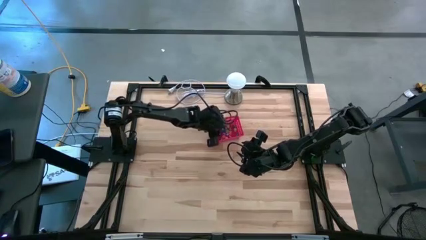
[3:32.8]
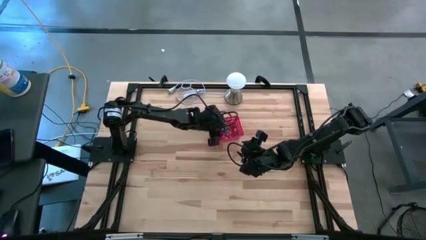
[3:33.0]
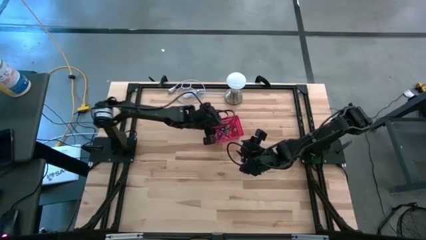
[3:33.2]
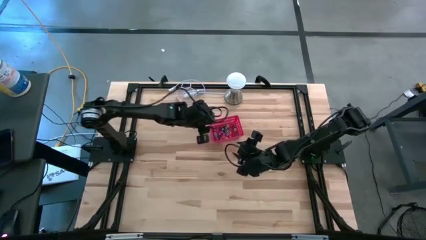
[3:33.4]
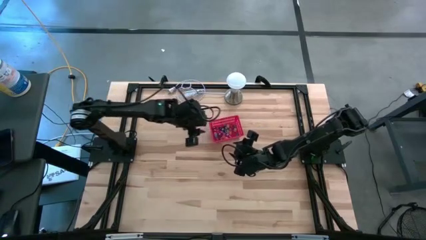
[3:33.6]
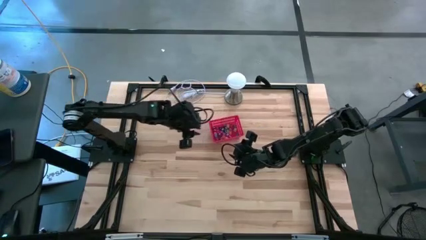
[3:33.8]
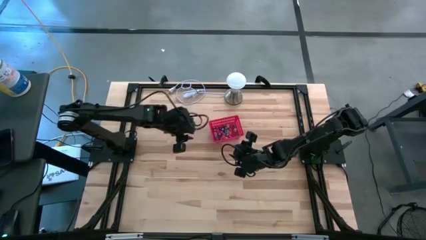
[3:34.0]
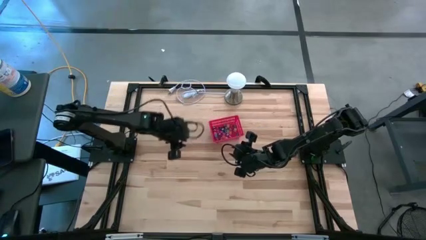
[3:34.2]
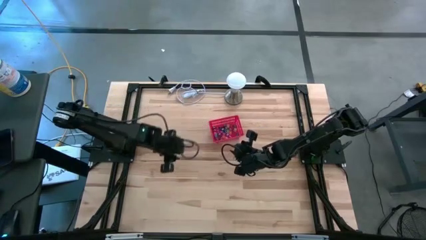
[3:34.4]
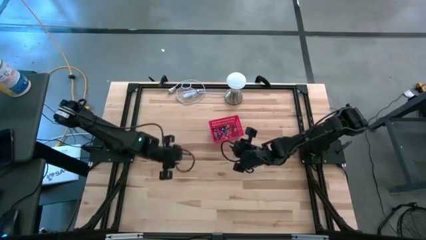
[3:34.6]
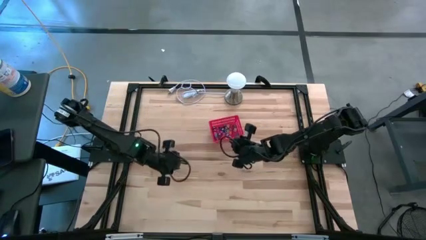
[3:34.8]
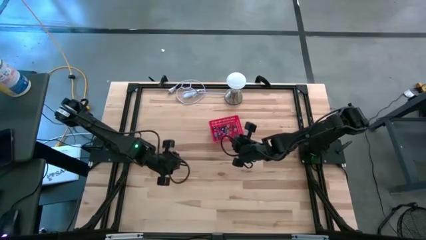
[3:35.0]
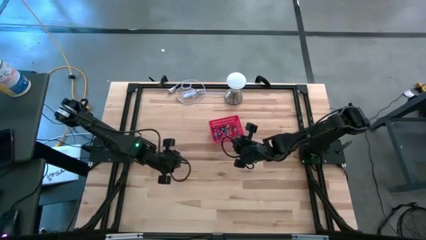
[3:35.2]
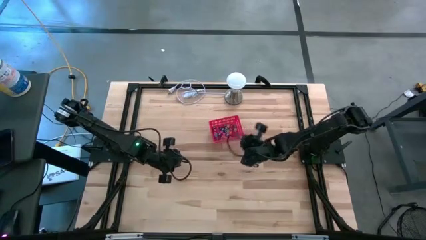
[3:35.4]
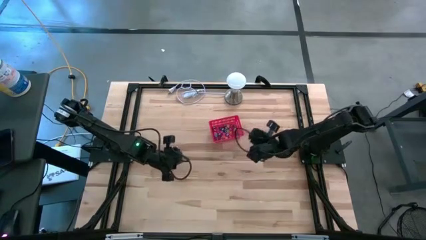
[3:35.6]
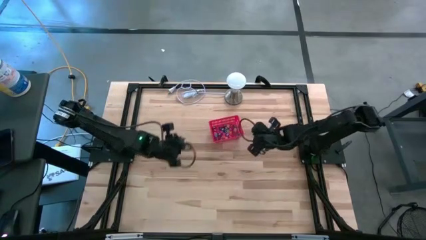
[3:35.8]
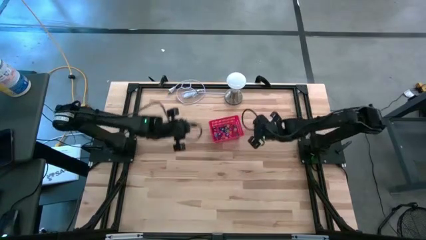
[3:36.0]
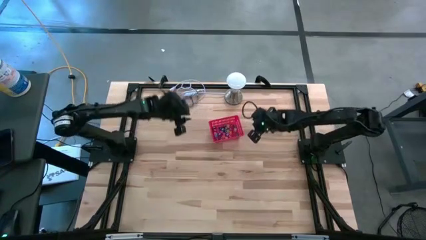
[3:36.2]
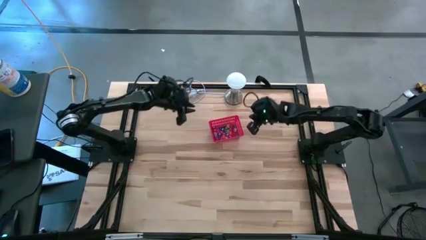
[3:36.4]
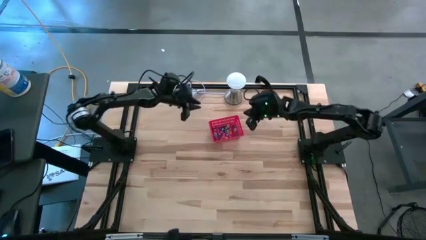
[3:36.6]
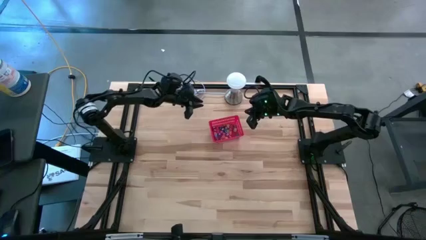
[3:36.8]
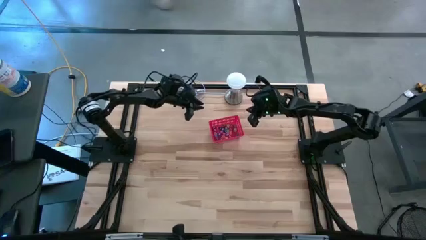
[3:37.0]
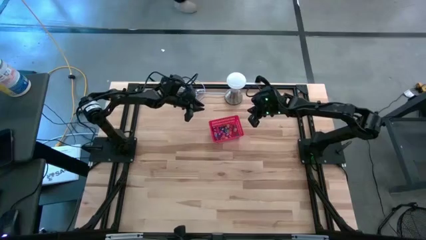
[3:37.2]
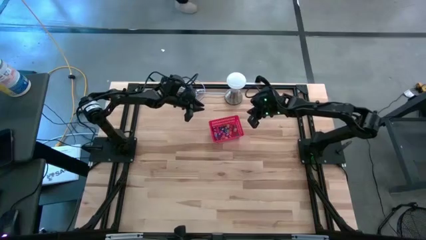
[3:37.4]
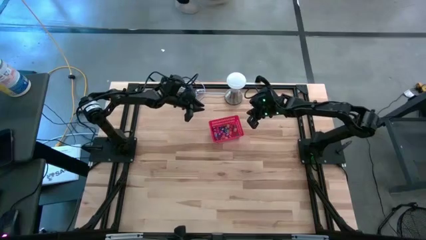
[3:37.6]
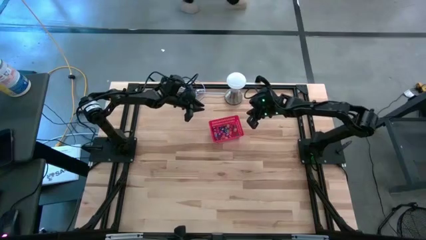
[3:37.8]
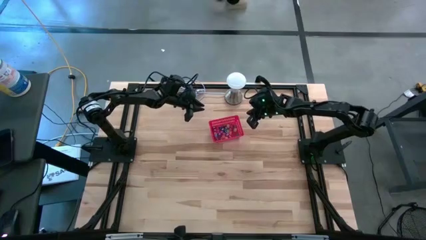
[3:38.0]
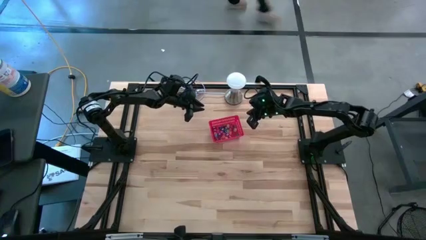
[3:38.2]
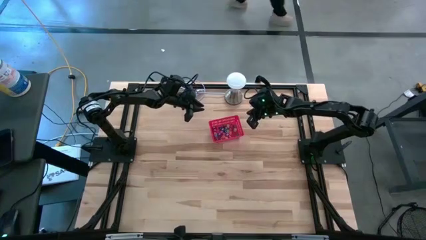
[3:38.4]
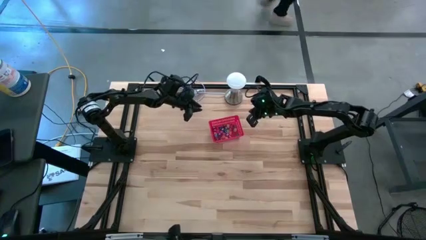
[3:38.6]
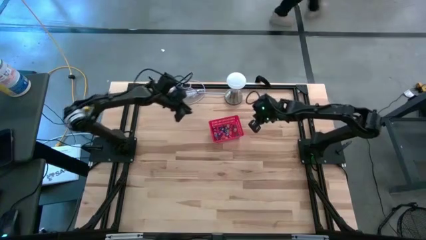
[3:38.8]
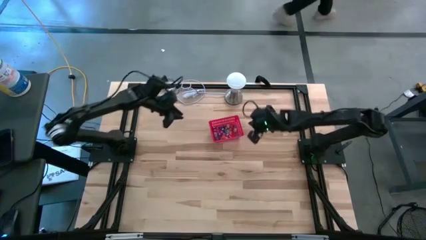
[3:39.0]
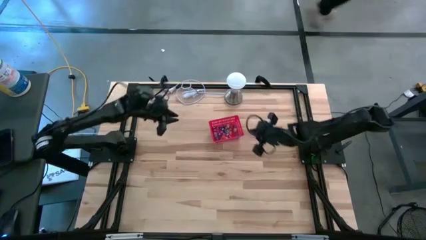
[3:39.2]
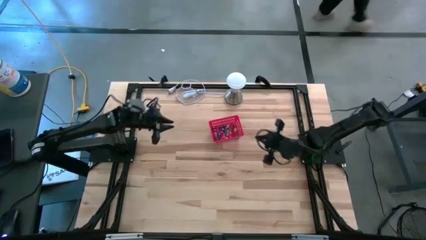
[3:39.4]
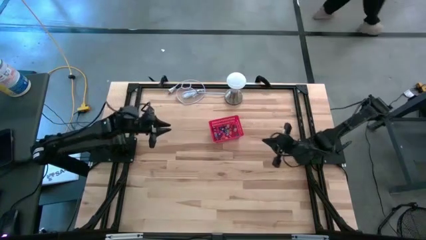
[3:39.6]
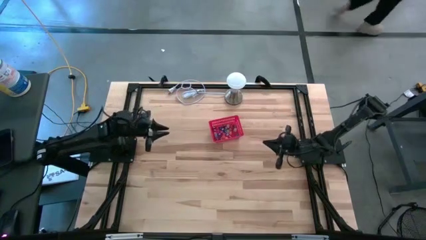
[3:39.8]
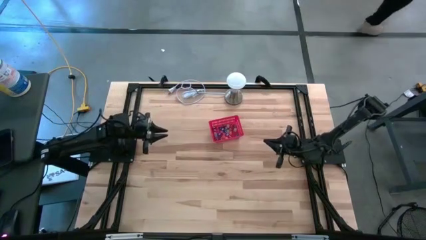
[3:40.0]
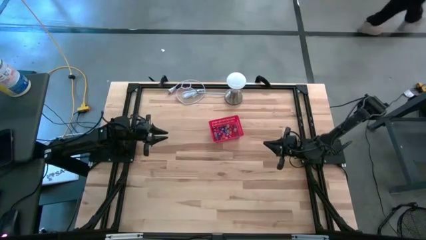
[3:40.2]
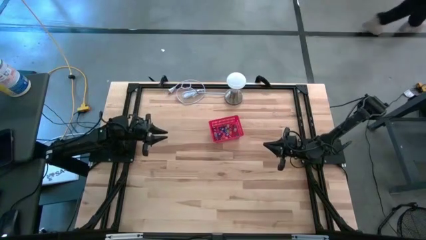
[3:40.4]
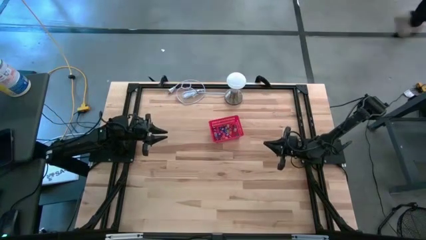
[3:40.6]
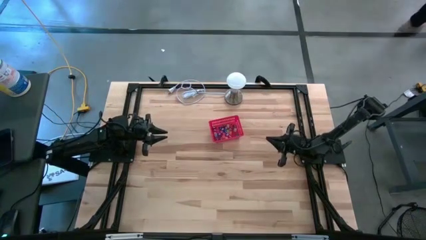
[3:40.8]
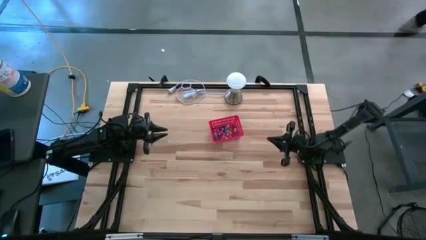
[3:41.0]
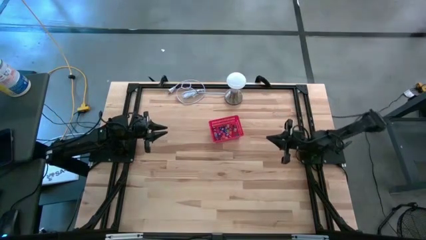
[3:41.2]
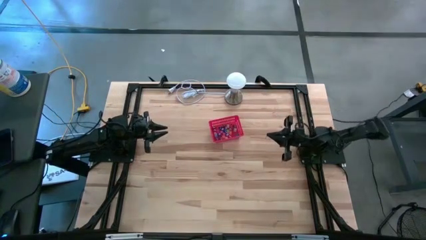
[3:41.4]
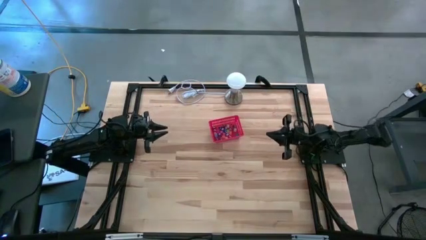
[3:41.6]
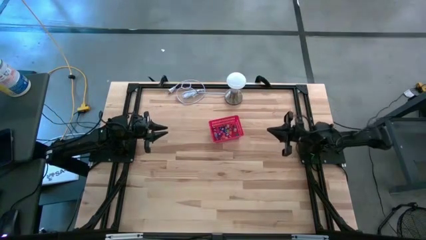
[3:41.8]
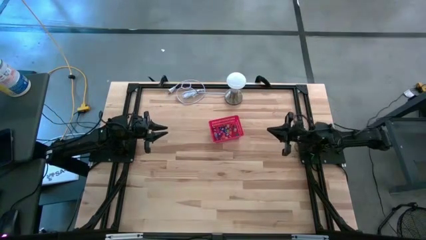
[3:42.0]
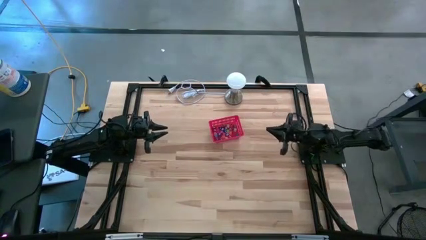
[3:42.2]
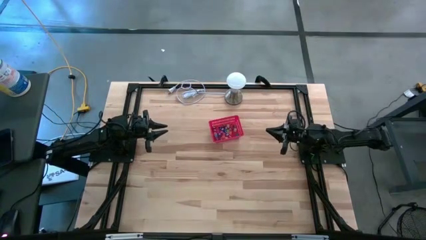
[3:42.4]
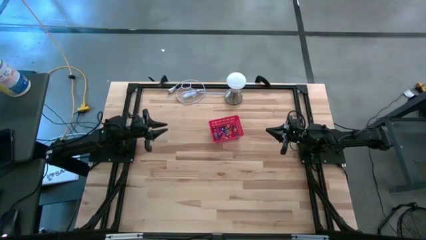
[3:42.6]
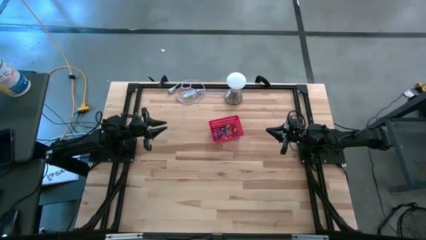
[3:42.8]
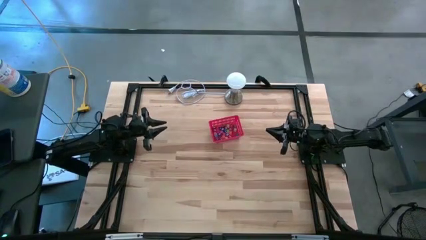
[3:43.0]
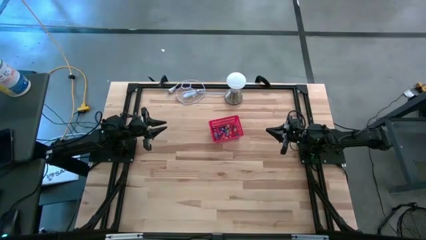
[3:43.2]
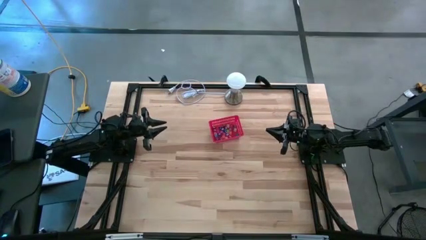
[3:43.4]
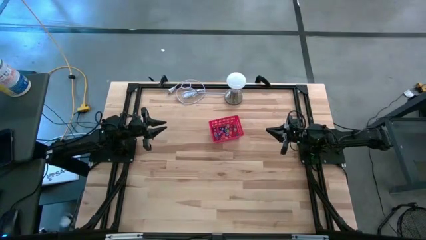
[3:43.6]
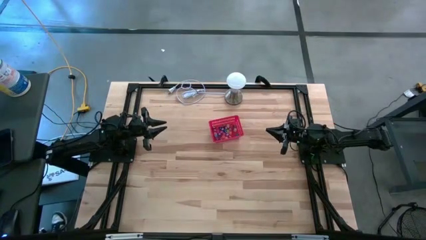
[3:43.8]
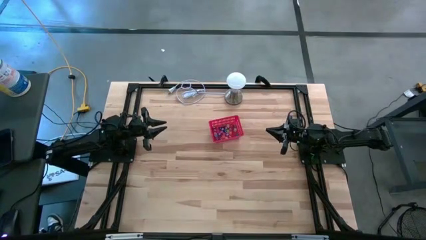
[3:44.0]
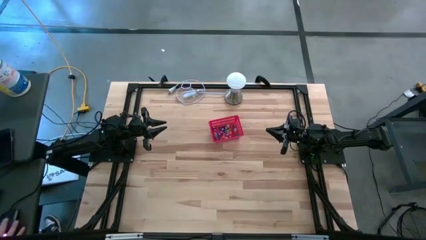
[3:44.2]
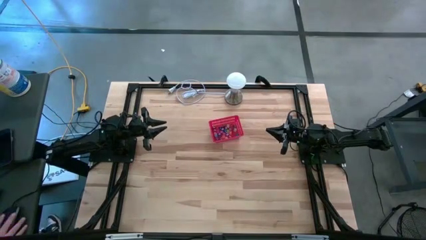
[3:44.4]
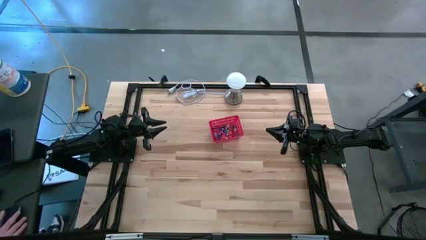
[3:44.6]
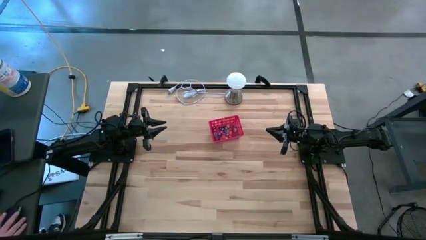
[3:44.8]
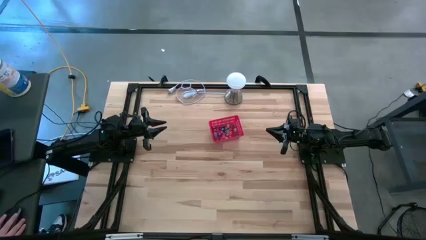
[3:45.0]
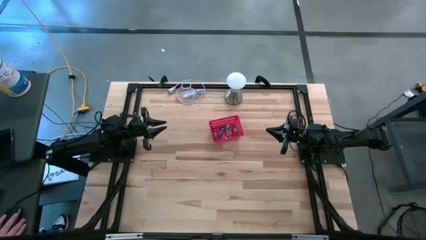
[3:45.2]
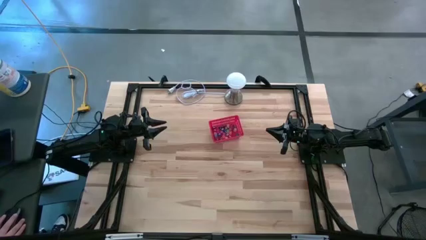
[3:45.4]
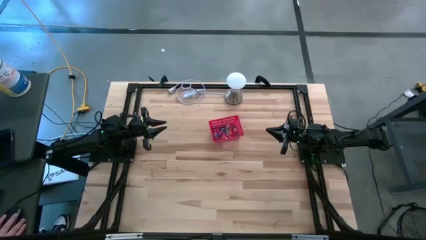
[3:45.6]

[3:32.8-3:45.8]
Task: Pick & Place Dice
Return to Home Position

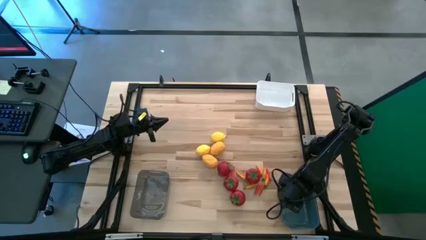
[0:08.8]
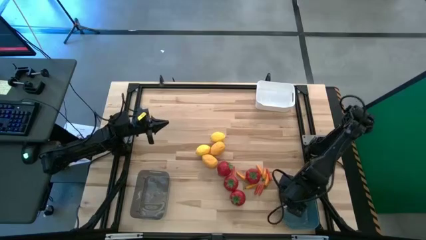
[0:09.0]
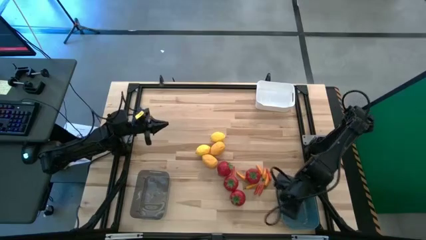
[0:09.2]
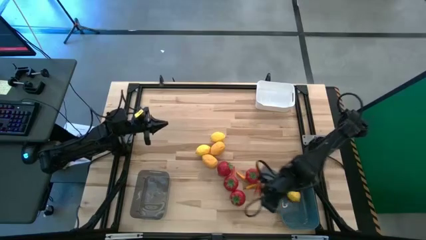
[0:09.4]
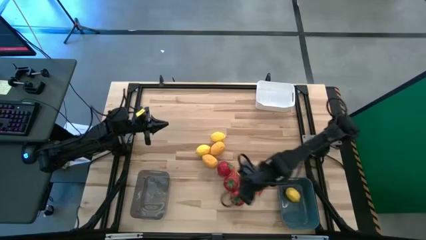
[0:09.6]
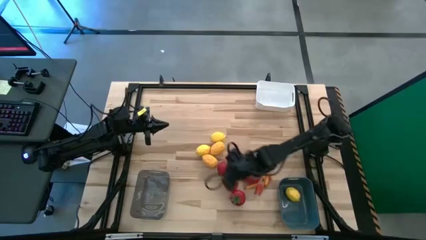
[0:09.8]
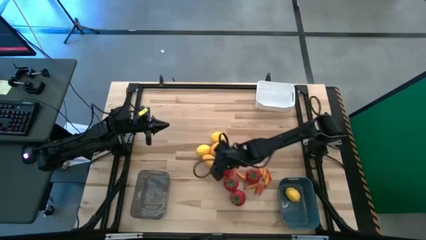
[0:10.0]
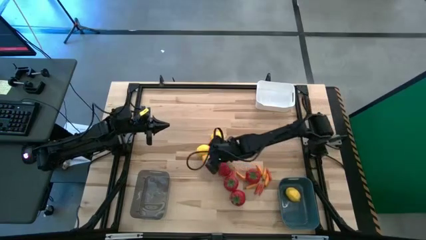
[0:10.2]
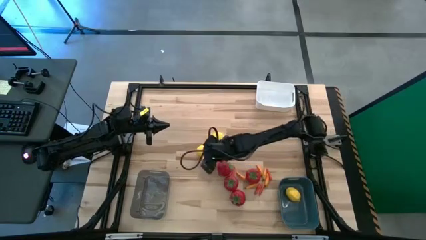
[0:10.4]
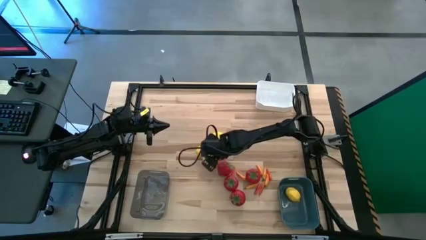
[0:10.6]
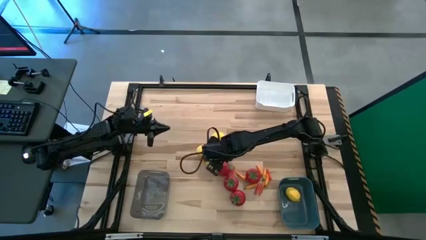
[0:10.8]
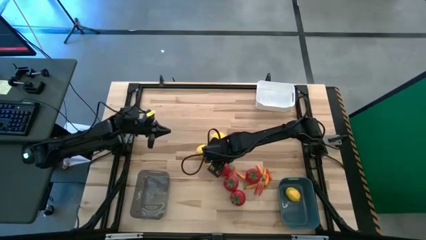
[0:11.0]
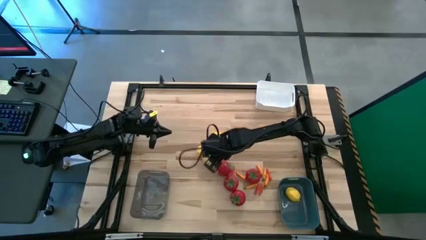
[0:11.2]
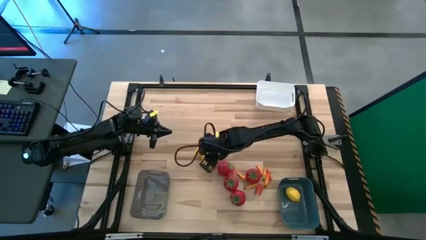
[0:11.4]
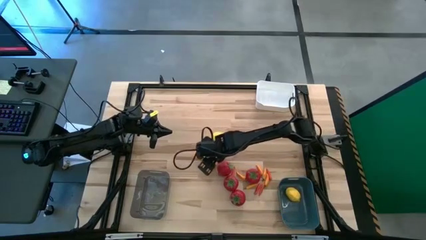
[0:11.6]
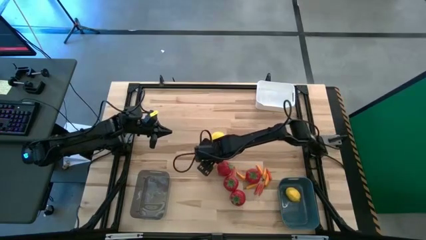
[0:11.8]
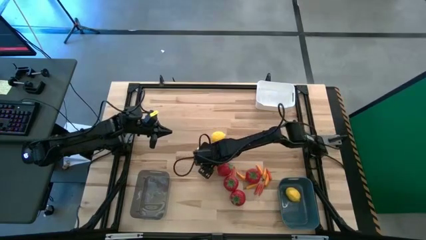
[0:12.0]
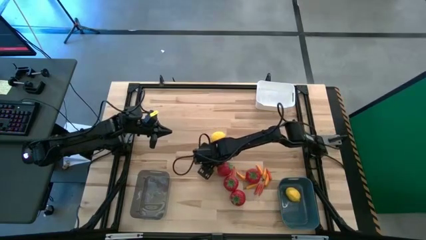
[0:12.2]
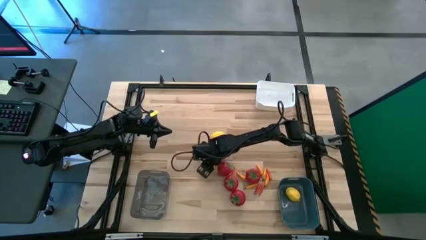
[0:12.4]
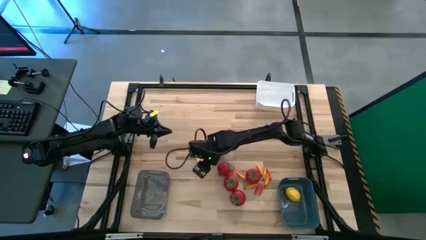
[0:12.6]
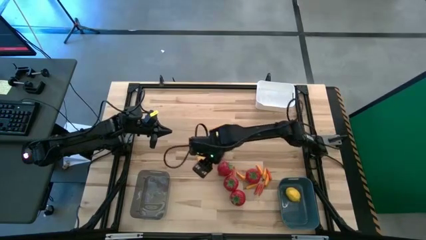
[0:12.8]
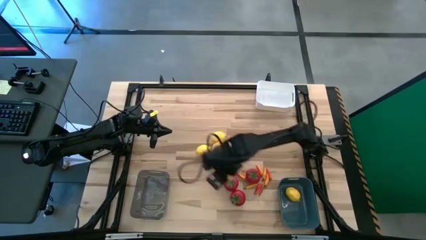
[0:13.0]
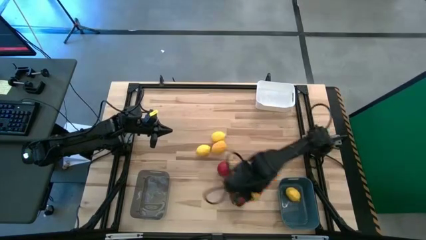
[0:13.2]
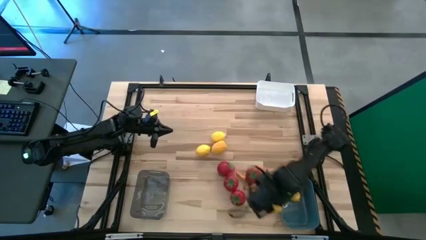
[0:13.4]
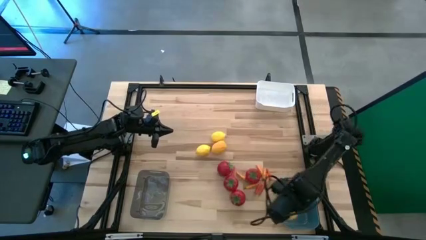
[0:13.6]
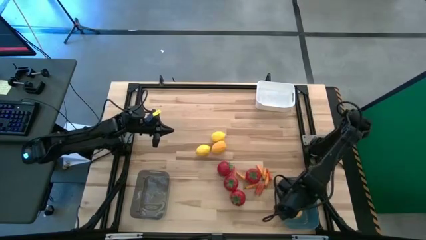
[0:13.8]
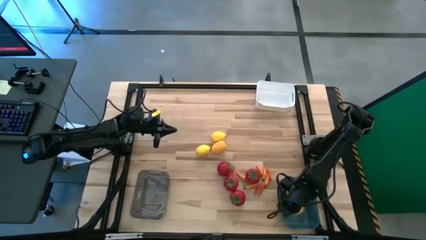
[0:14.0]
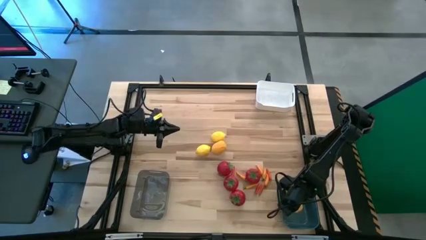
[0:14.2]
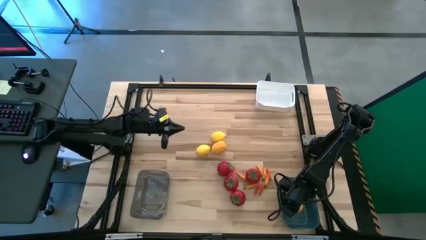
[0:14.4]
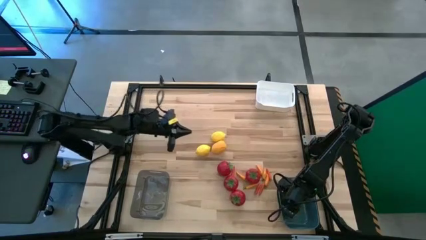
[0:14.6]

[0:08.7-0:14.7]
Task: Sort produce into baskets
Put the lemon into the blue bin
